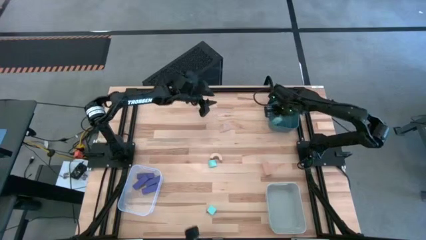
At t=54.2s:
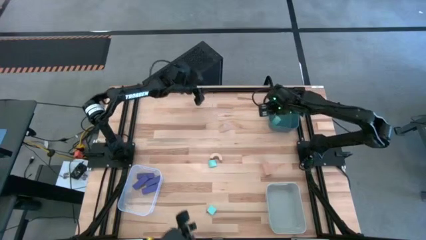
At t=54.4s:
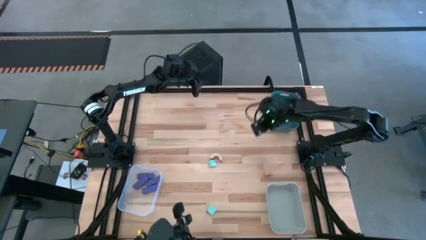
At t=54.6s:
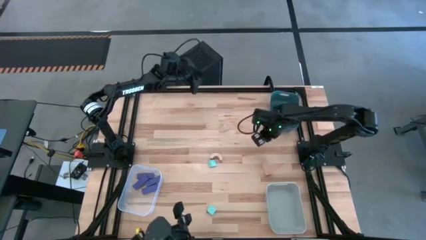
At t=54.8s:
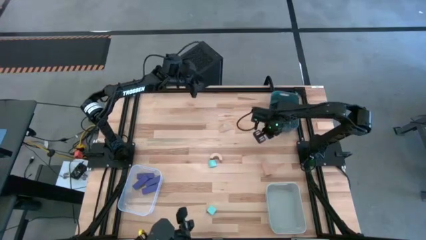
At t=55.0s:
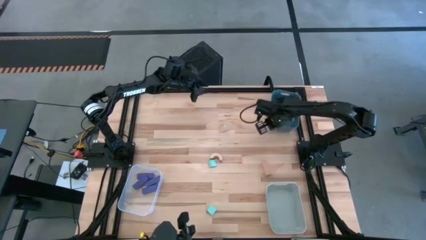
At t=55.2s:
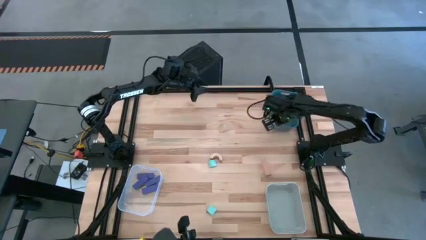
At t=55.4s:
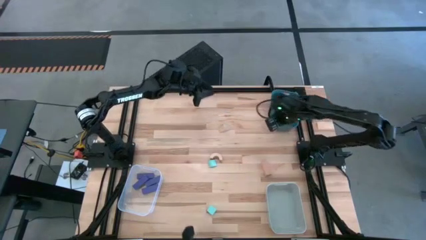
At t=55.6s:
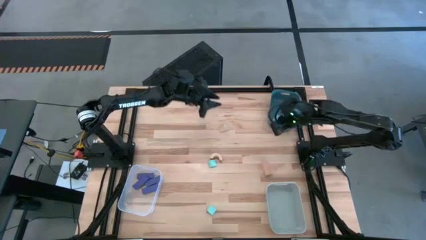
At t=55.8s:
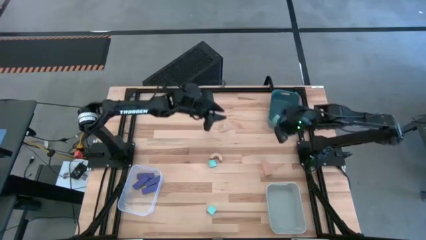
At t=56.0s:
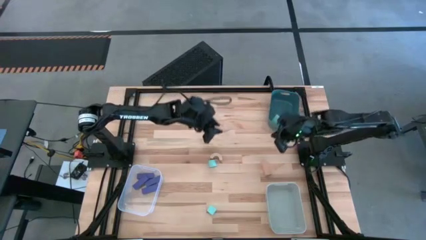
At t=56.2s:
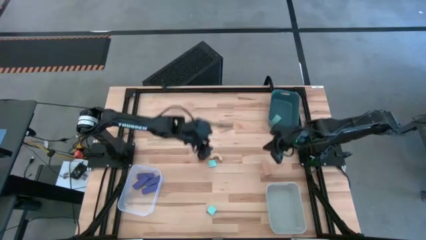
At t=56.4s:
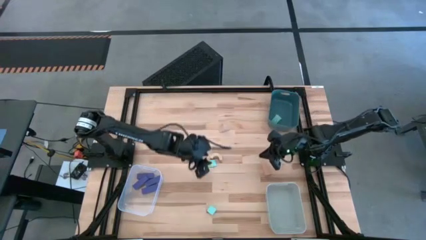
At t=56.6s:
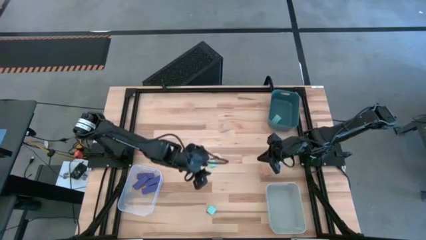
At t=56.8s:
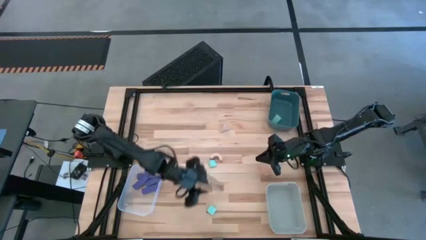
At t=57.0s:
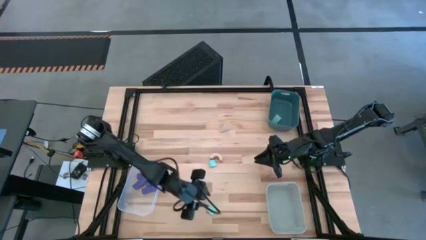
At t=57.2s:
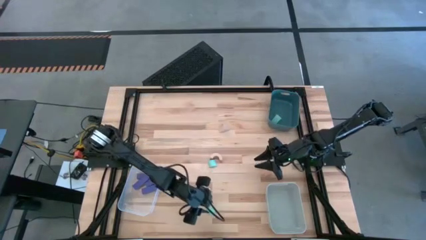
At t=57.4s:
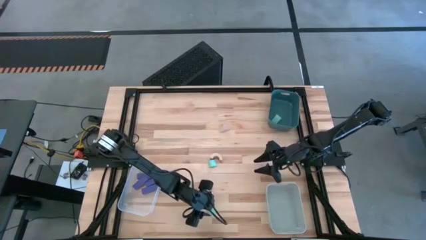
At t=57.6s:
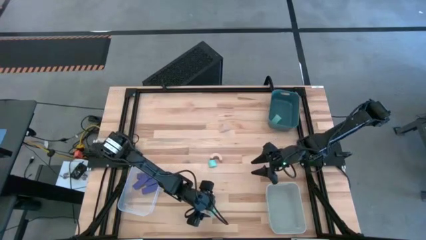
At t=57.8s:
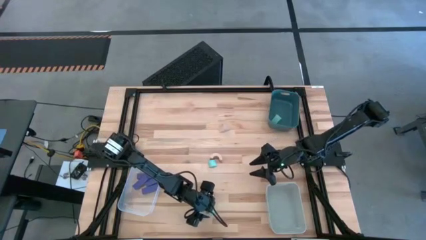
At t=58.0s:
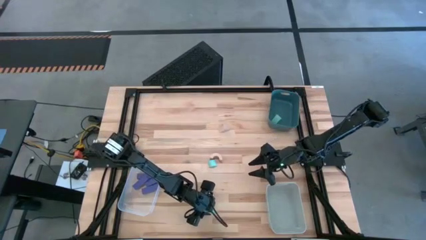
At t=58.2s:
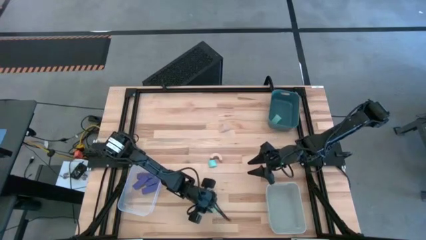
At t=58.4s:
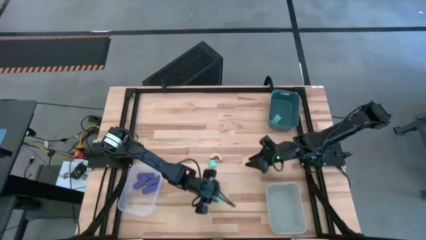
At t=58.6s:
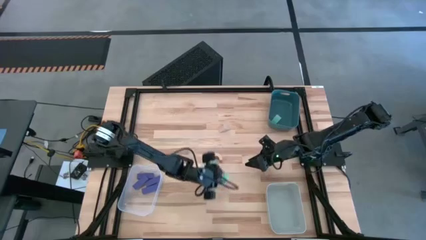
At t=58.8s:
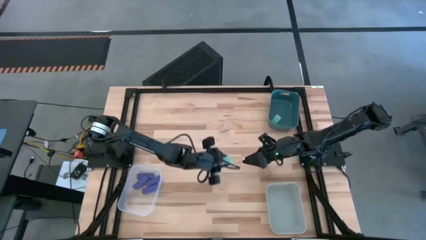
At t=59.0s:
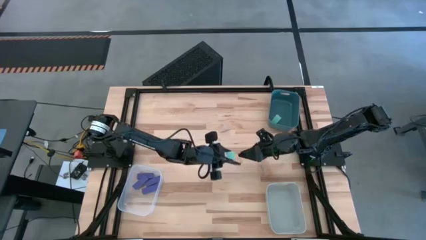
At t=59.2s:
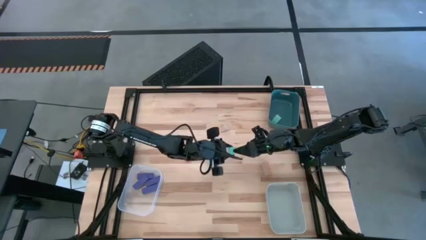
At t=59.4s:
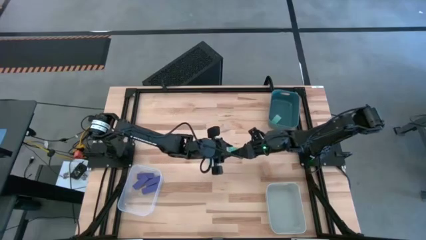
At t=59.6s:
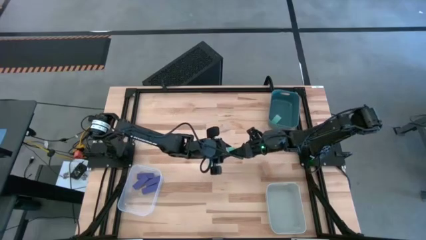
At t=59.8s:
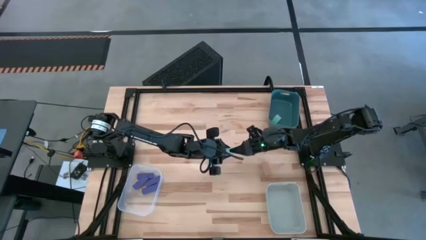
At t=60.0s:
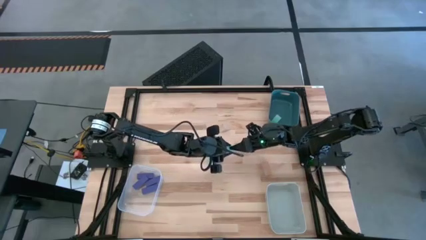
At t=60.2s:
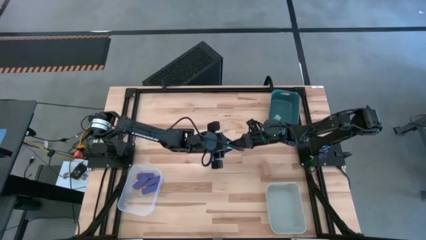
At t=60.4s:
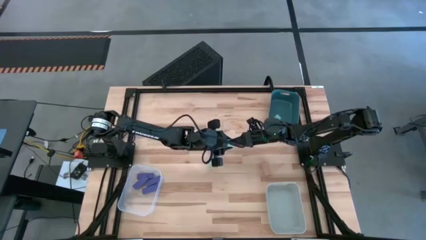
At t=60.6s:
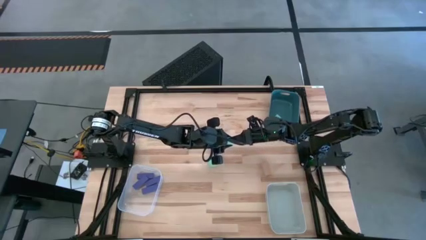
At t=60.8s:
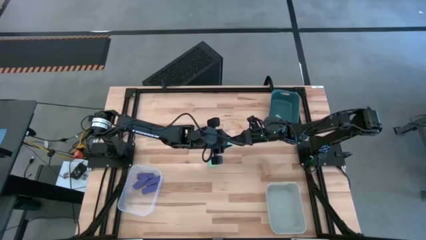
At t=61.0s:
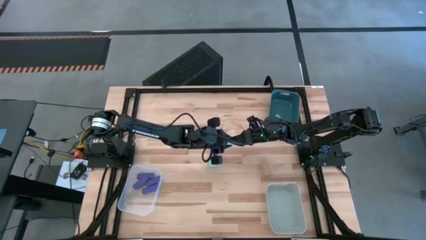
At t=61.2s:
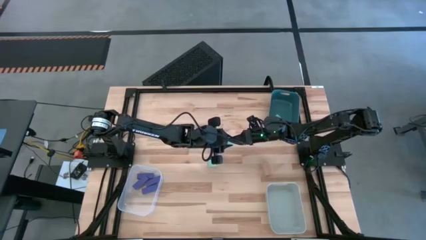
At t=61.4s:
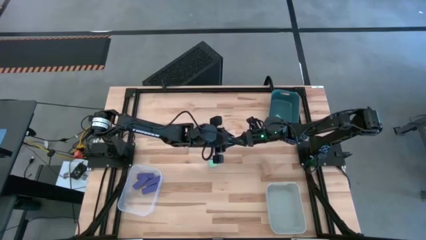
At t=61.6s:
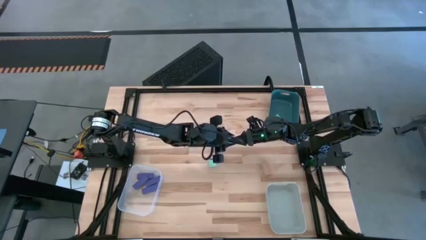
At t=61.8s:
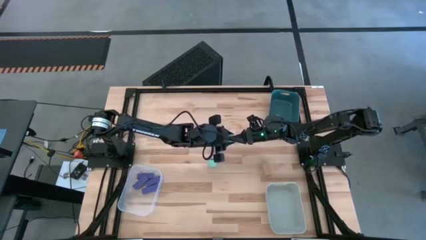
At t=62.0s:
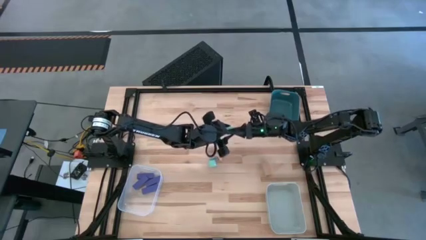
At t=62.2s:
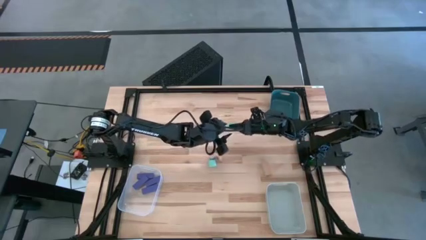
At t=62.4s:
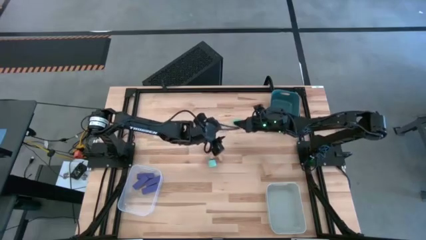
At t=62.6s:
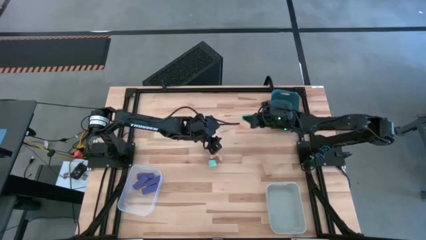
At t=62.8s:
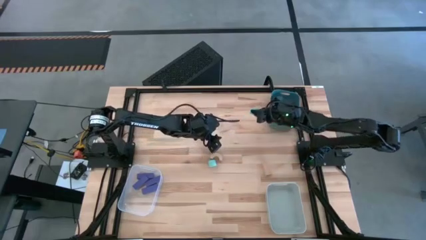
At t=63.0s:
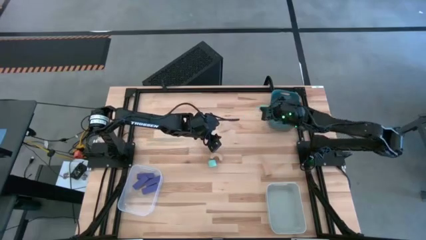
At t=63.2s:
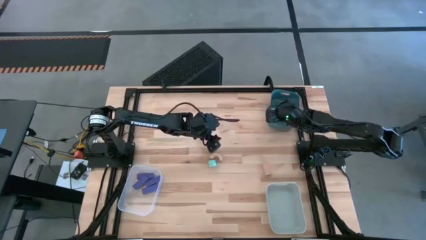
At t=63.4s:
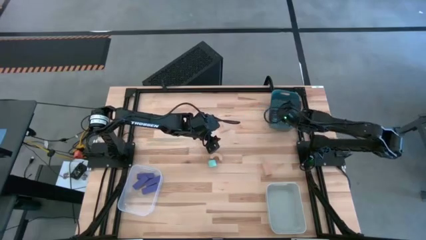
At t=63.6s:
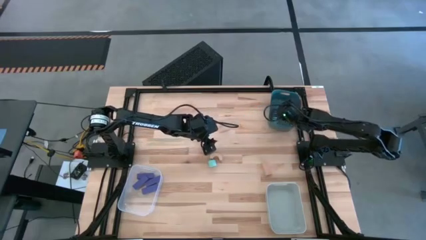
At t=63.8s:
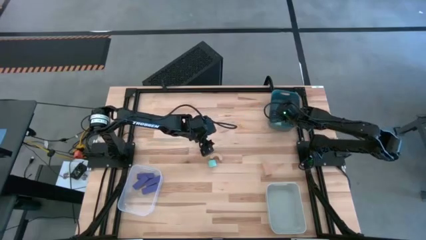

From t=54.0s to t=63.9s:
Task: Sort & place blocks by color
Put the bottom blue block into the blue bin

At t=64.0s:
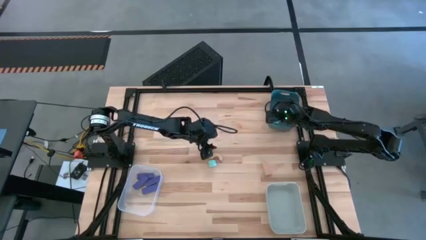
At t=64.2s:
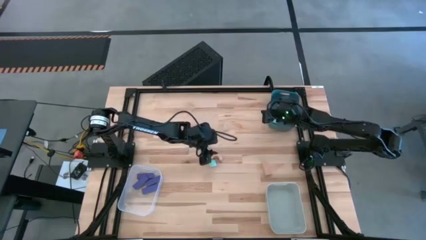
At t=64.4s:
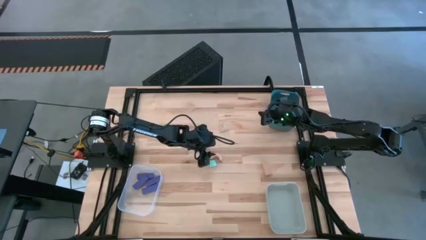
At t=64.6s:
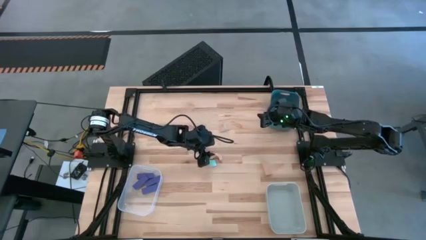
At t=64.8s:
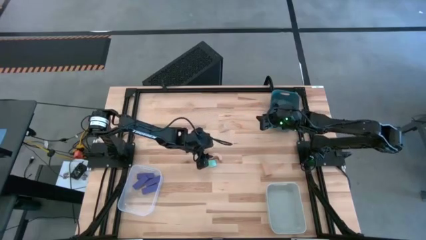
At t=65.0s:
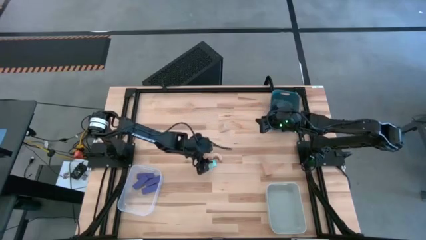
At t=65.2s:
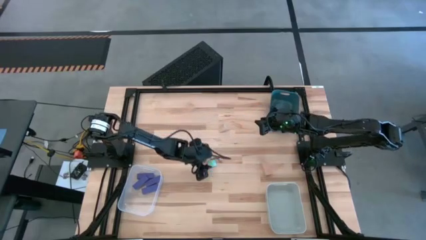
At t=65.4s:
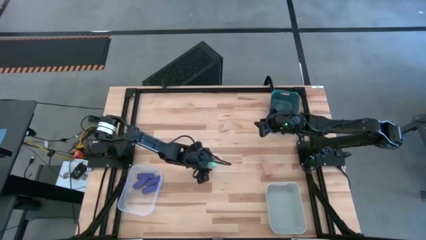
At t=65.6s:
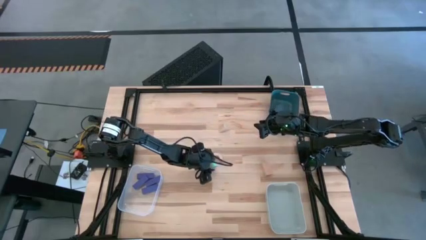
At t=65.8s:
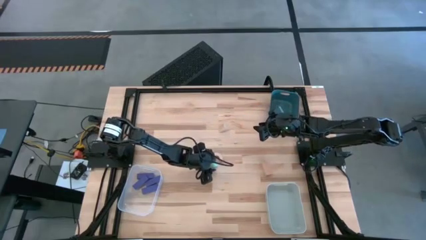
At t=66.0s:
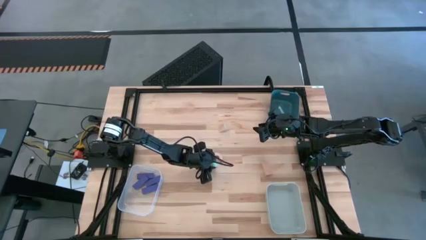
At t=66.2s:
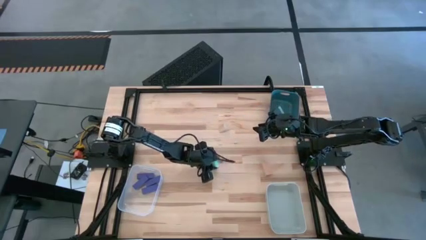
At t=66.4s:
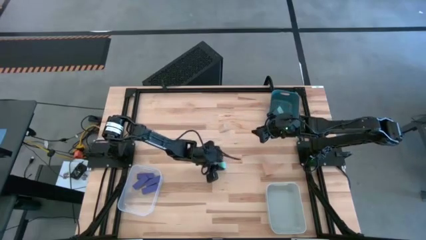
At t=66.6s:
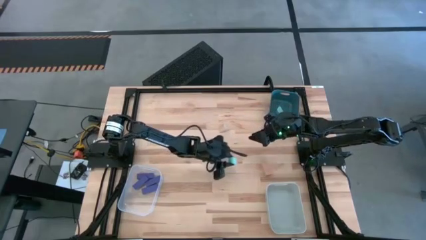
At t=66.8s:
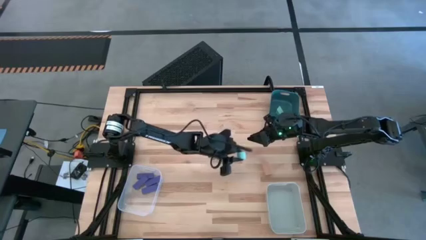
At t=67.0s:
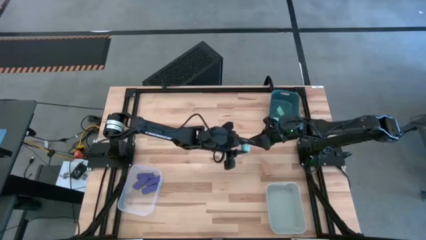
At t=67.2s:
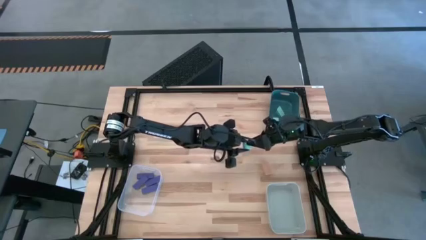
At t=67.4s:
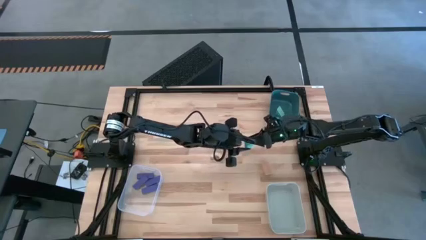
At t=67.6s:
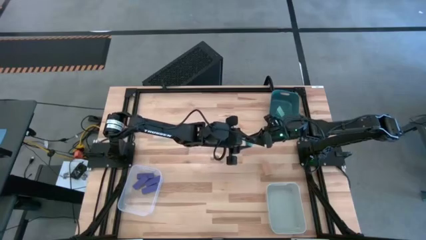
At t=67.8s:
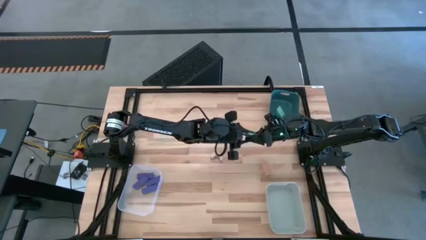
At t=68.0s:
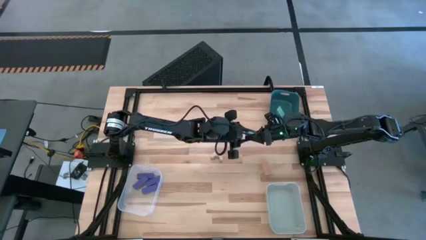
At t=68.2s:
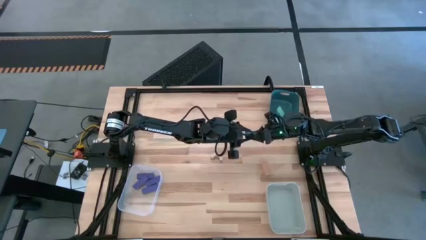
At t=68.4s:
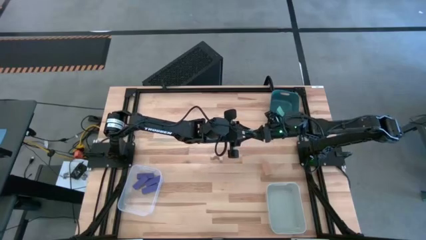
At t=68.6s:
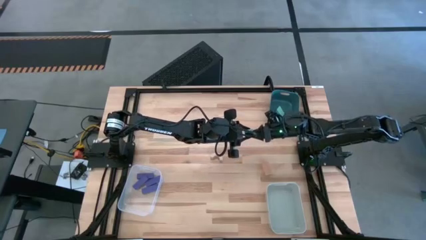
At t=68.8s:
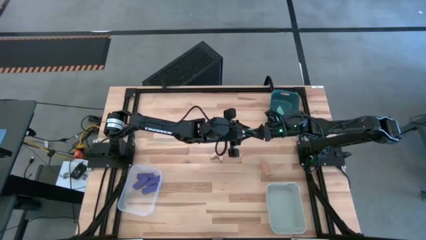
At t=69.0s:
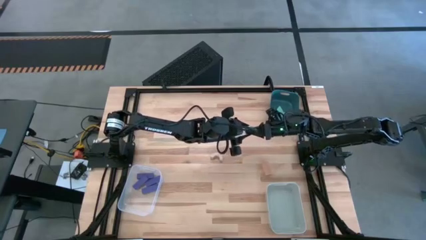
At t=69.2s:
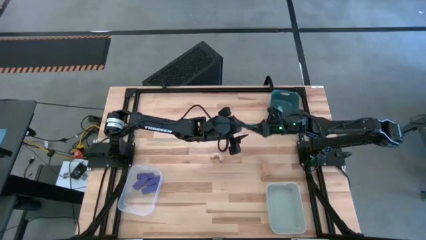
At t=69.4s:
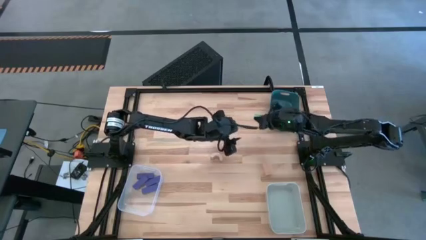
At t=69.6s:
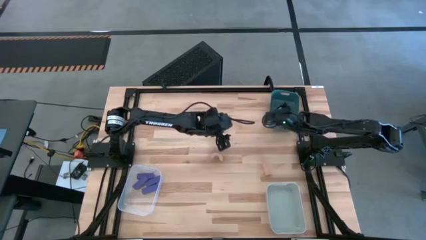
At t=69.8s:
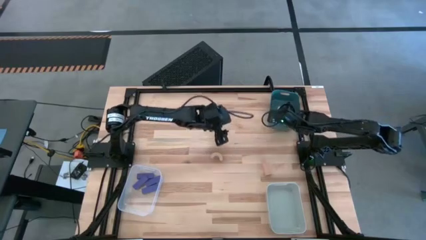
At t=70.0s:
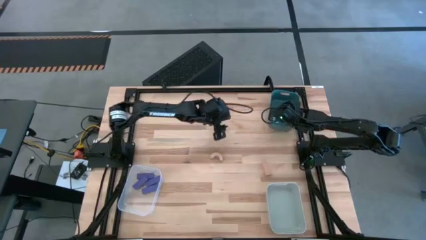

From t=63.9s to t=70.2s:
Put the blue block into the blue bin
